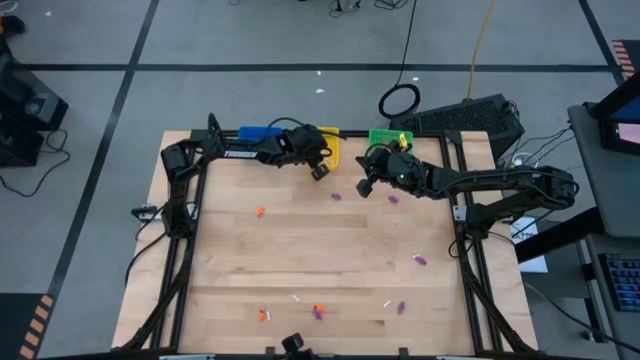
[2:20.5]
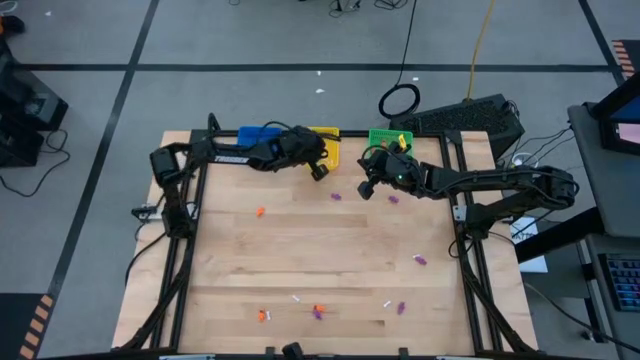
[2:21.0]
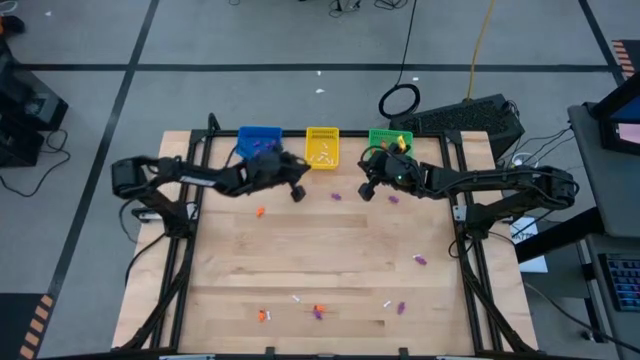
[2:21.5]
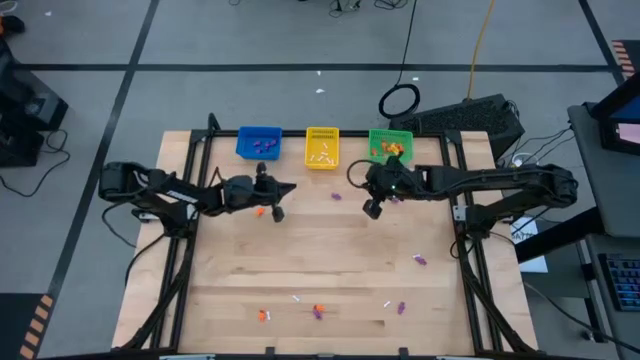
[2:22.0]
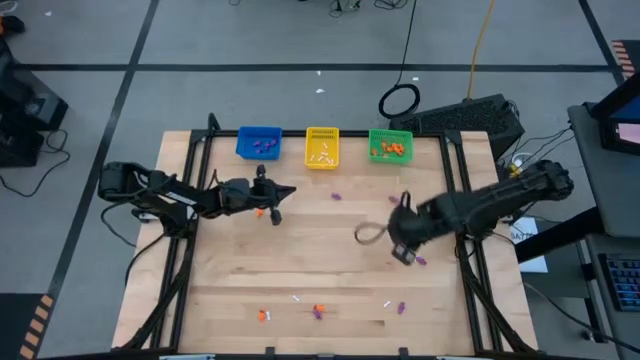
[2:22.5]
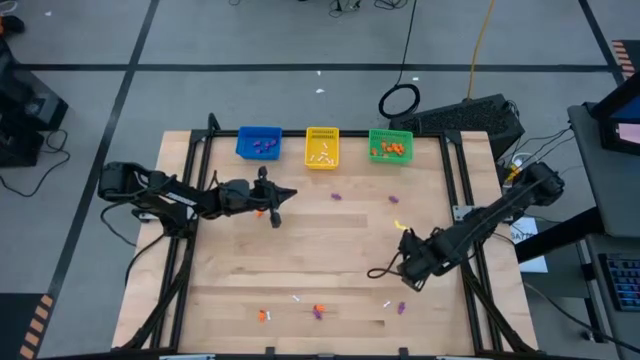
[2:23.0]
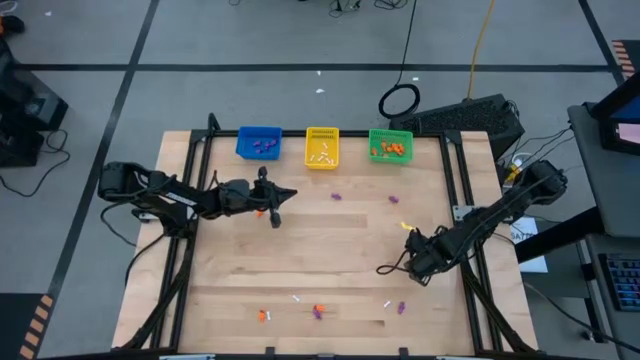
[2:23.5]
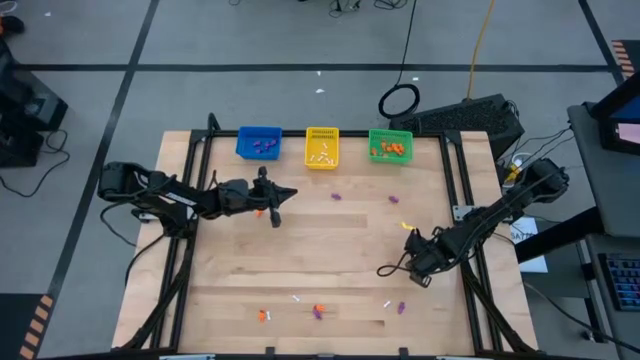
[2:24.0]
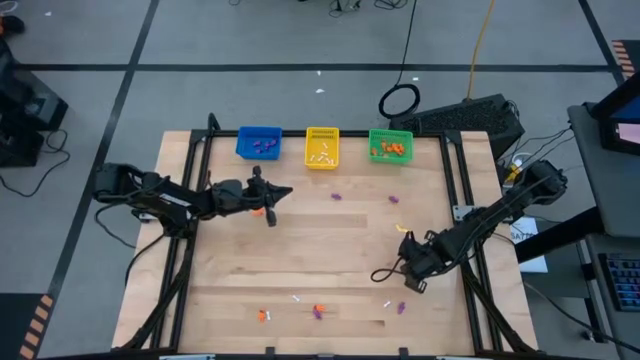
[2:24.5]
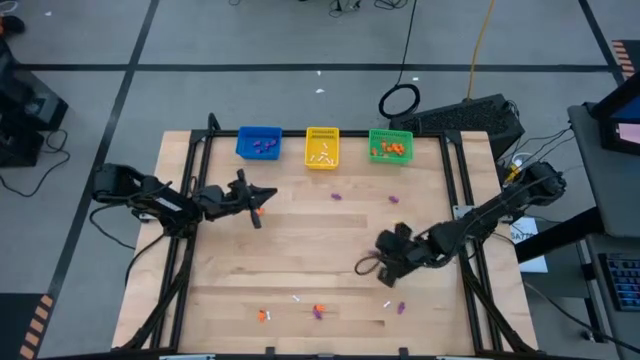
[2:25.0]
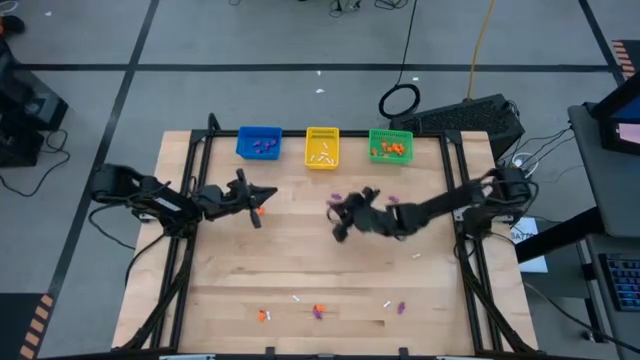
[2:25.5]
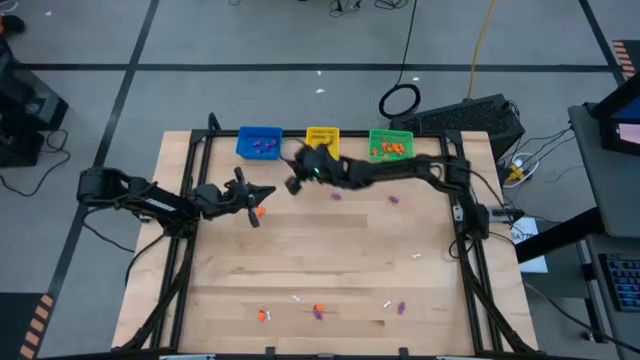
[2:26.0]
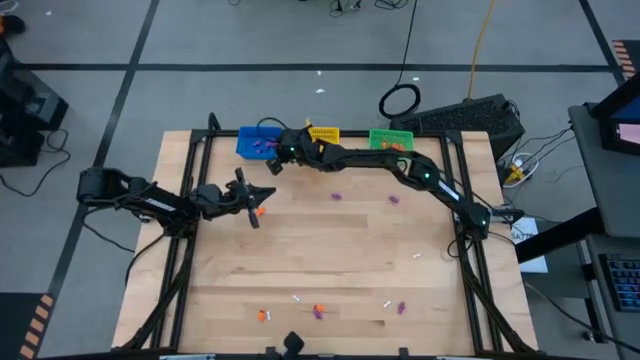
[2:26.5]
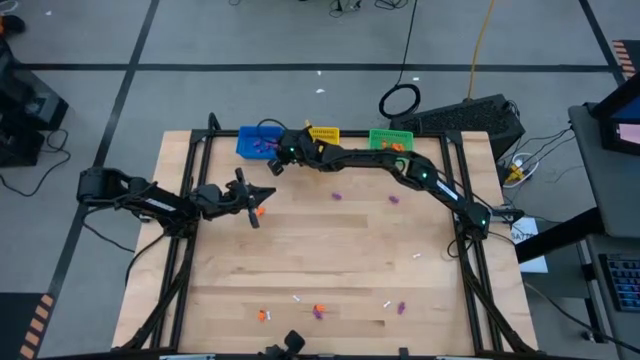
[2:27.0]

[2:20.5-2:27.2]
Task: Sort Halloween decoration
Put the violet skeleton toy into the blue bin

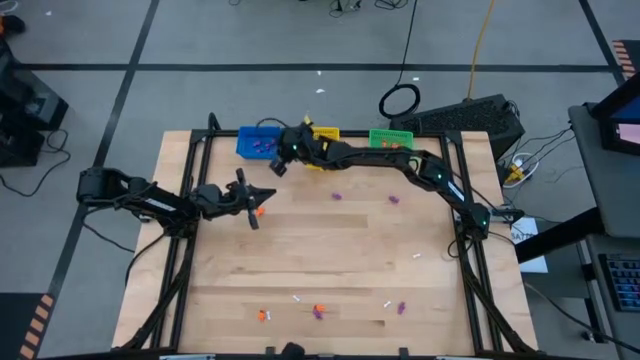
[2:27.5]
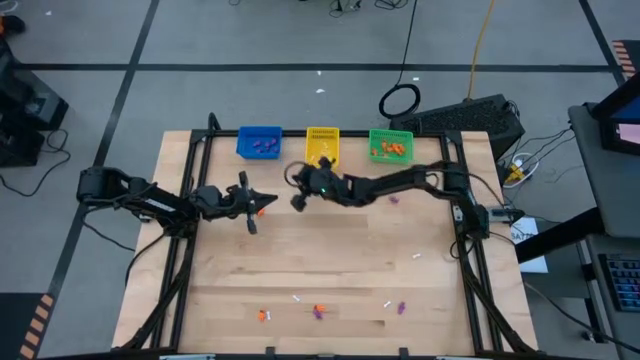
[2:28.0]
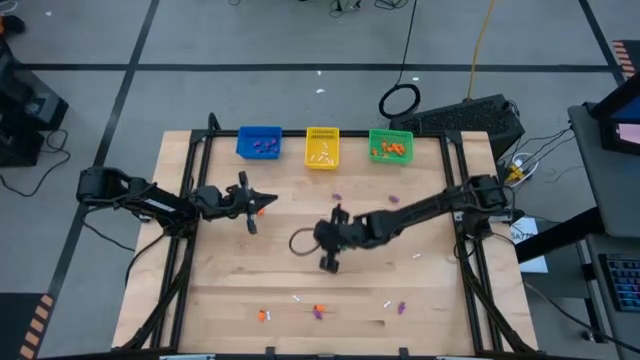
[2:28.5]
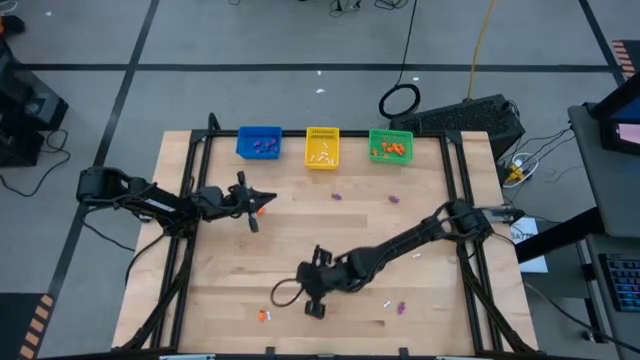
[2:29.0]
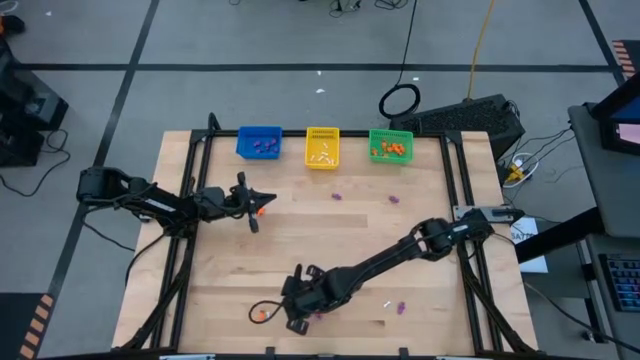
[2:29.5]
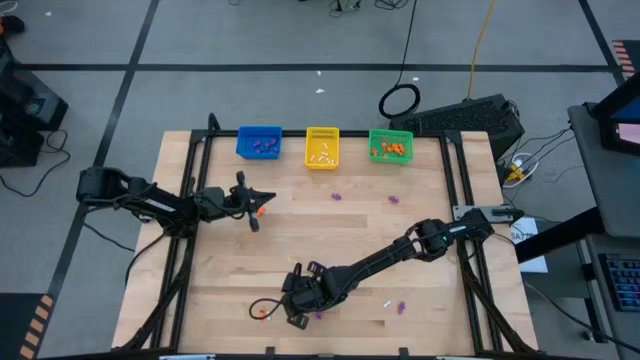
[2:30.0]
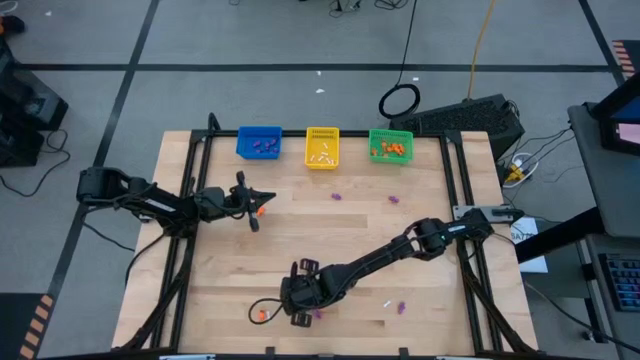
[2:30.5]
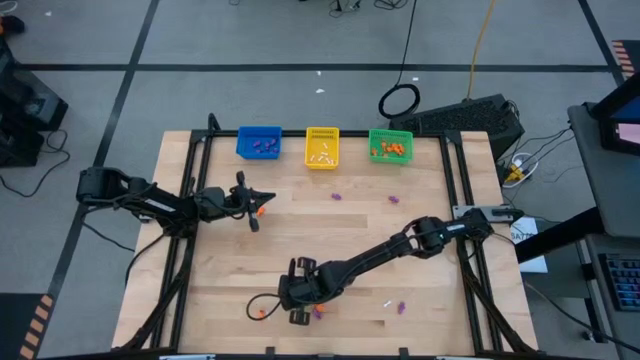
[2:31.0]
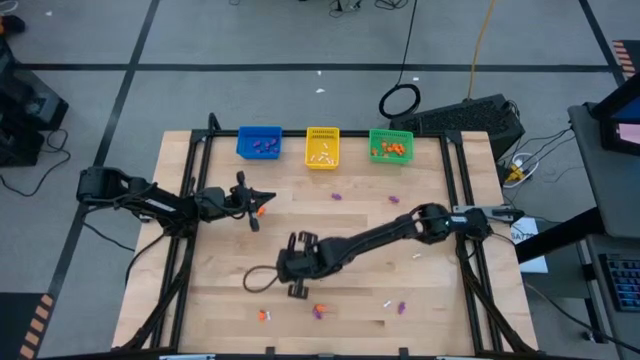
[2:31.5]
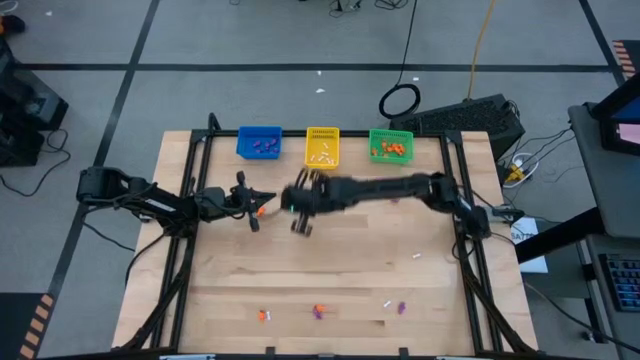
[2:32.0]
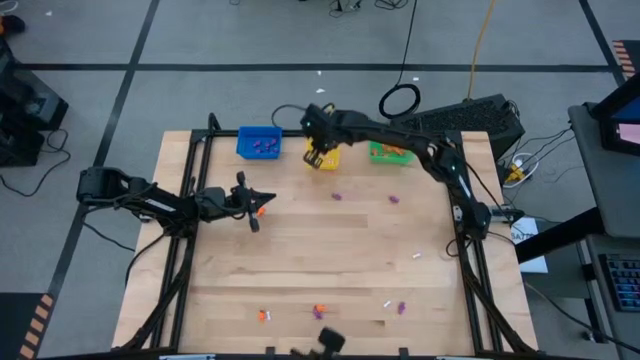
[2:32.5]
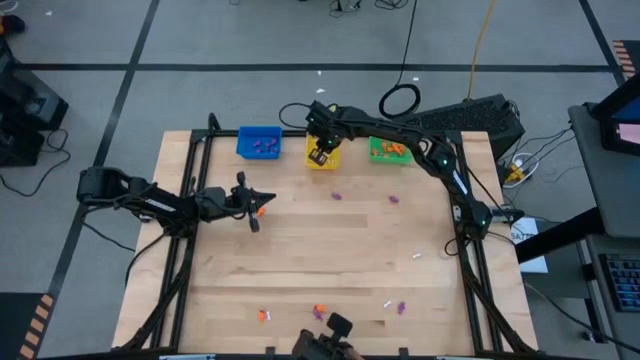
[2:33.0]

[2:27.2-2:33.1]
Put the white bone toy into the yellow bin

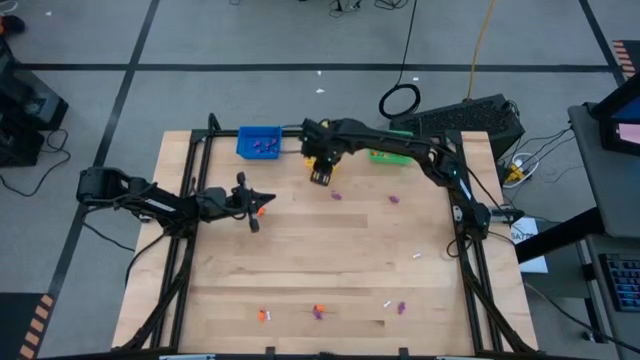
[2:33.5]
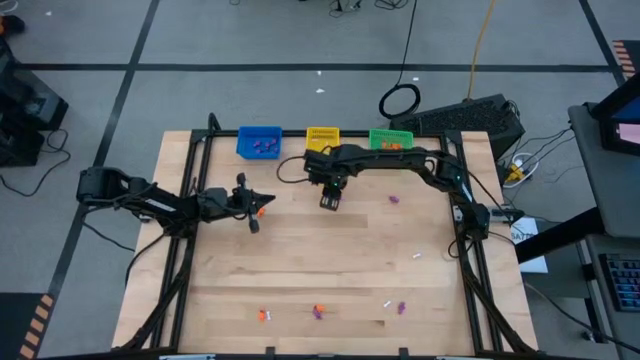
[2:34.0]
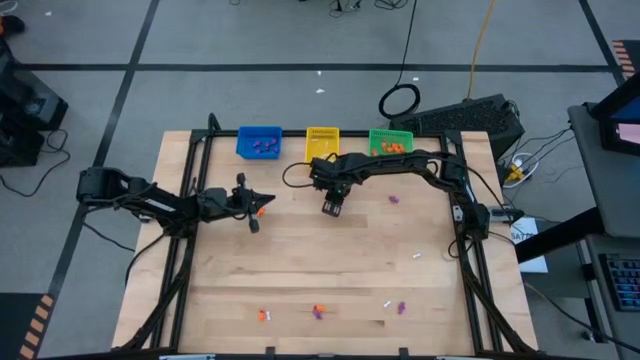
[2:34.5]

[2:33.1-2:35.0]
Put the violet skeleton toy into the blue bin

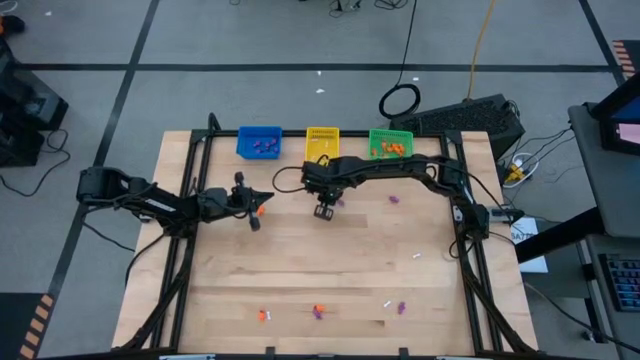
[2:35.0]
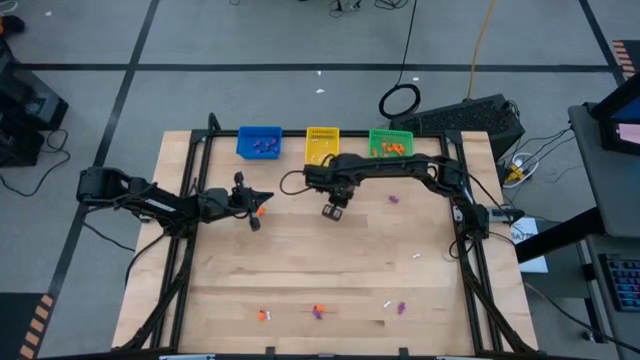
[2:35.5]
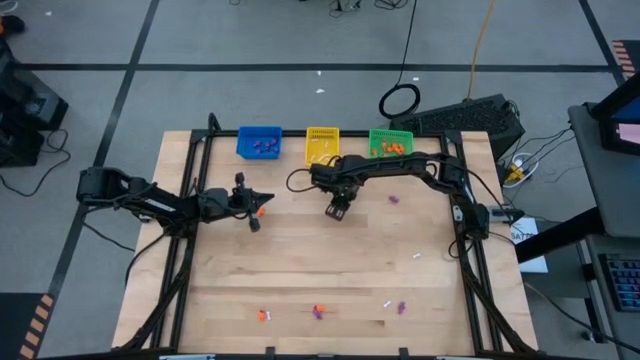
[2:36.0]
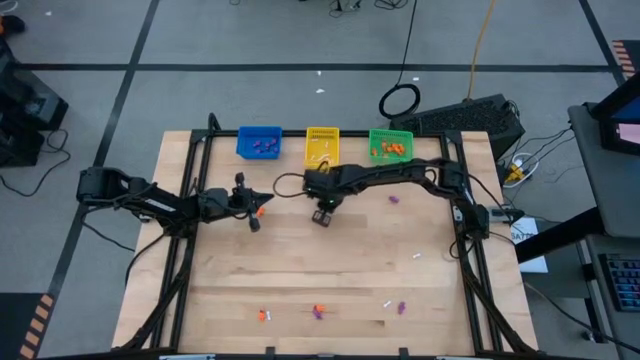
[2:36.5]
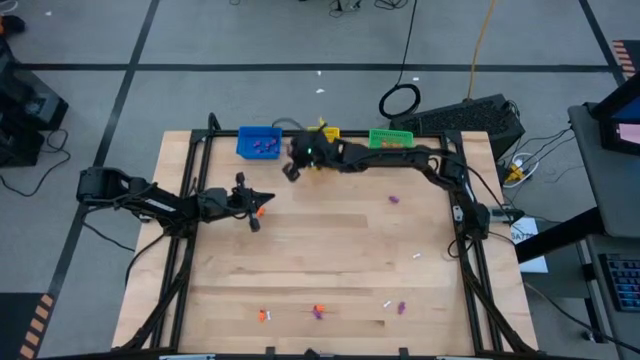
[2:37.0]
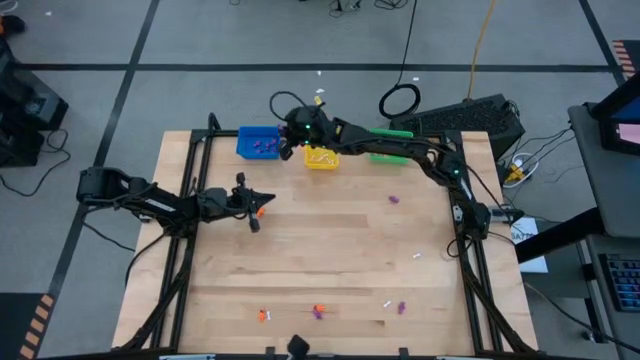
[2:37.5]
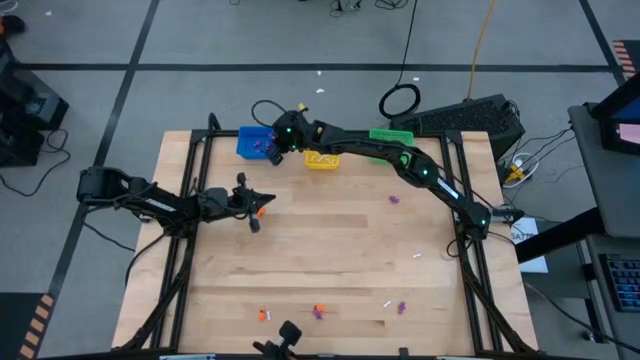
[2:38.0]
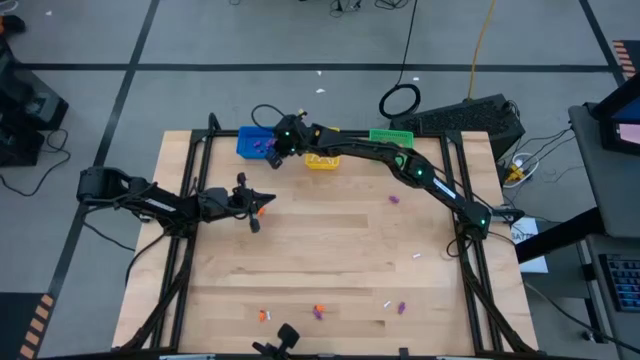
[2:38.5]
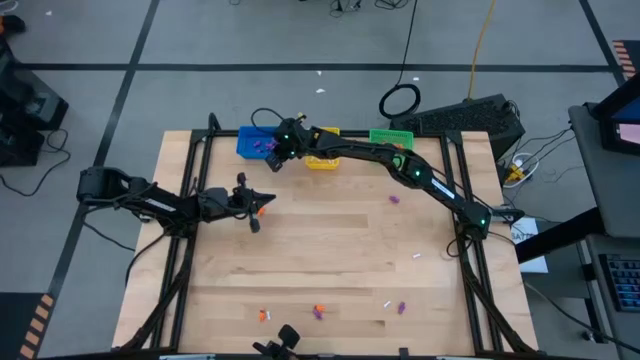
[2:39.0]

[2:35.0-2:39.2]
Put the violet skeleton toy into the blue bin

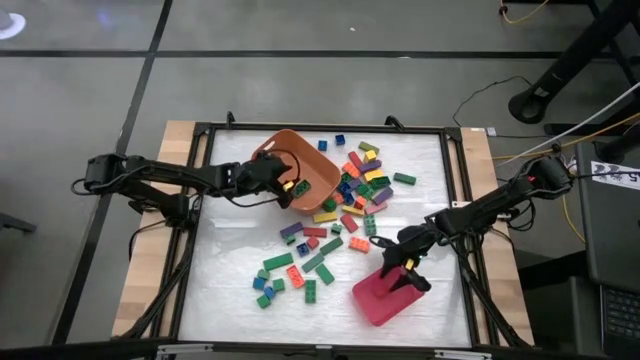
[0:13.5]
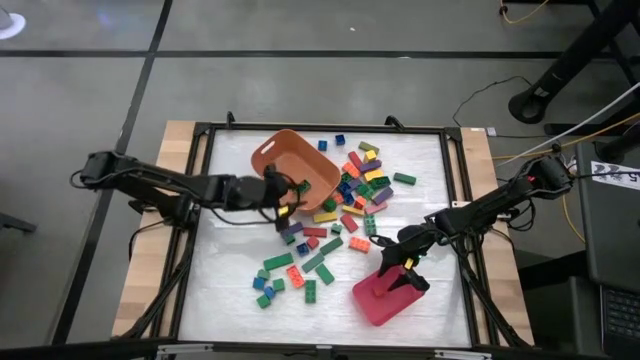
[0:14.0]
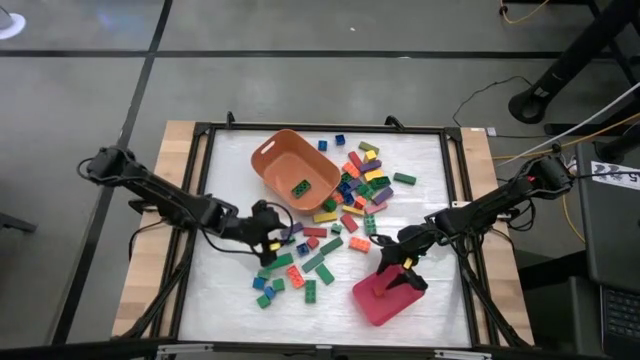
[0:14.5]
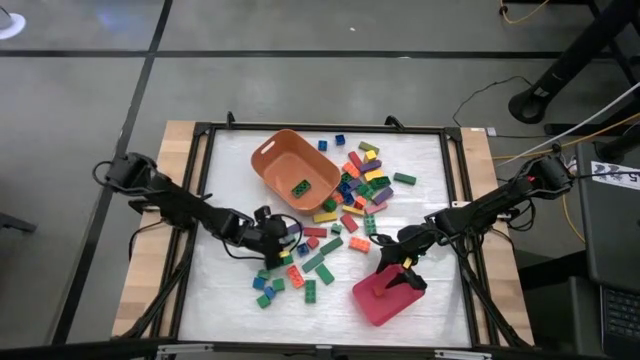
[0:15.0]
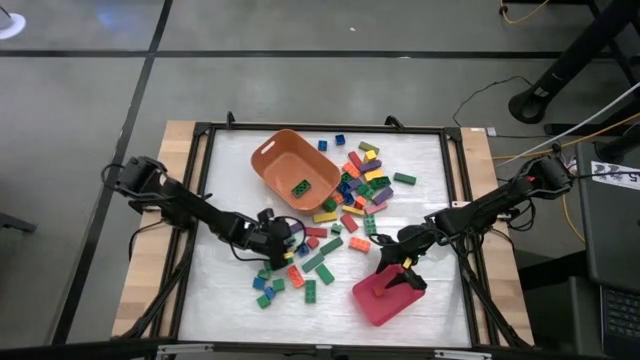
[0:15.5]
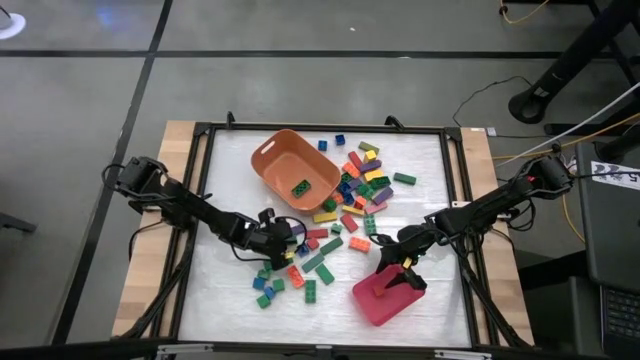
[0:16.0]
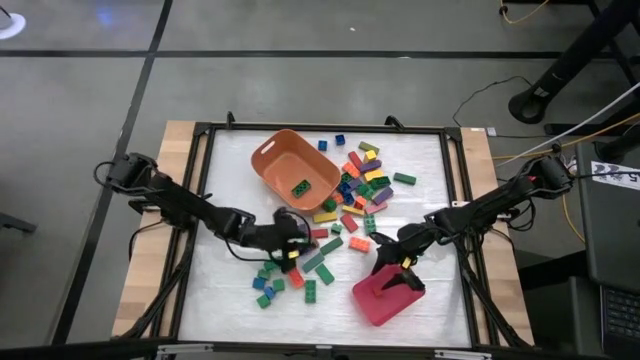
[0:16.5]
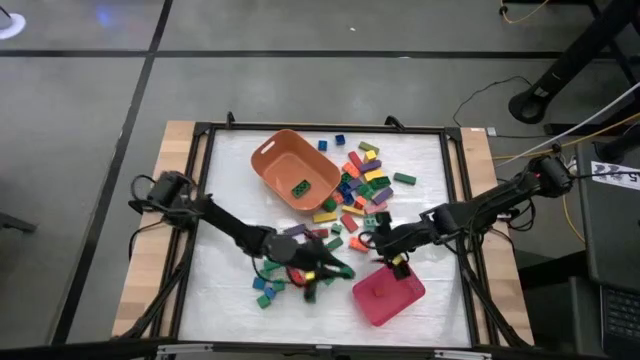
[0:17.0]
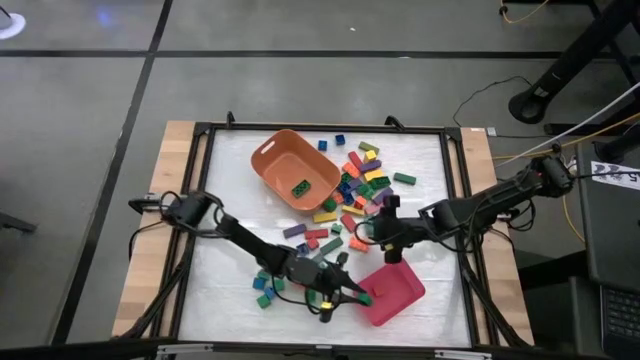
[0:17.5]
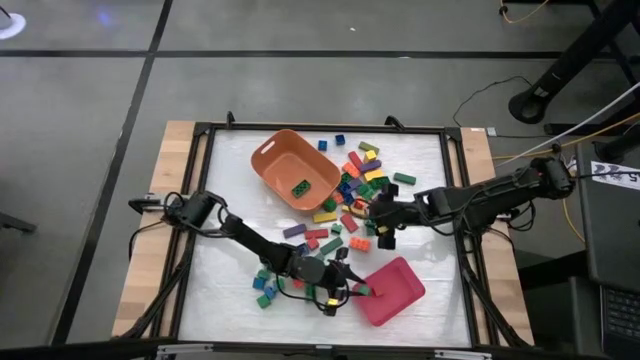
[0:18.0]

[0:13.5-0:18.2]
Task: Sort blocks by size
Put the small green game piece into the red bin
